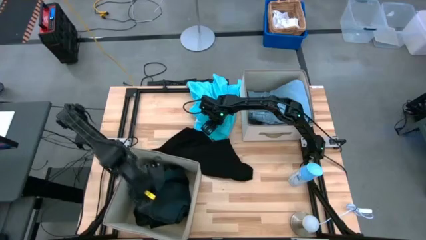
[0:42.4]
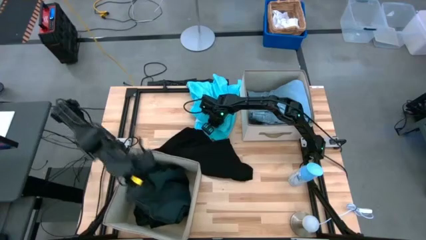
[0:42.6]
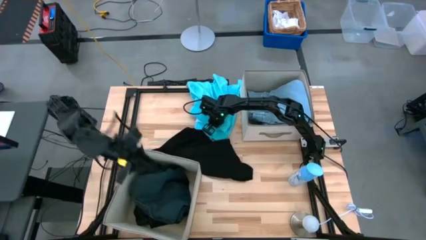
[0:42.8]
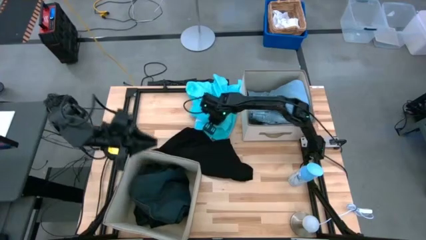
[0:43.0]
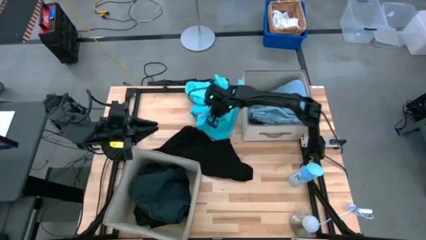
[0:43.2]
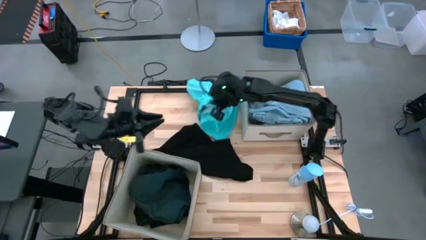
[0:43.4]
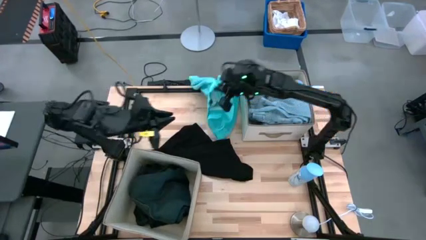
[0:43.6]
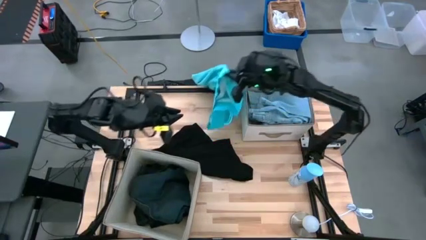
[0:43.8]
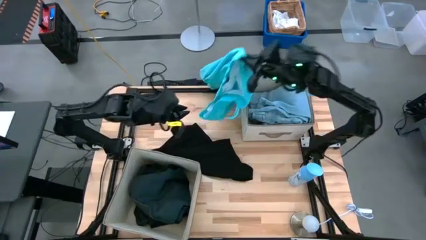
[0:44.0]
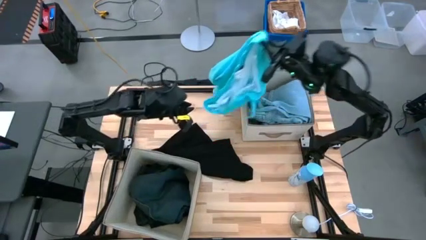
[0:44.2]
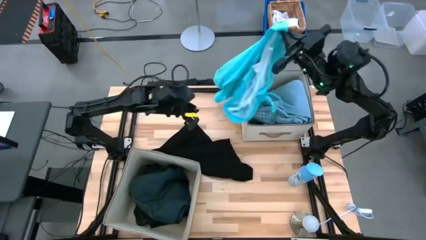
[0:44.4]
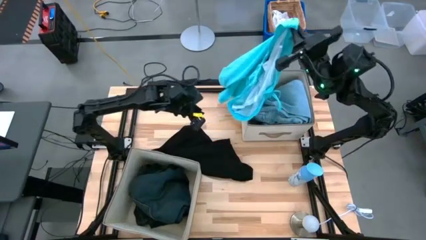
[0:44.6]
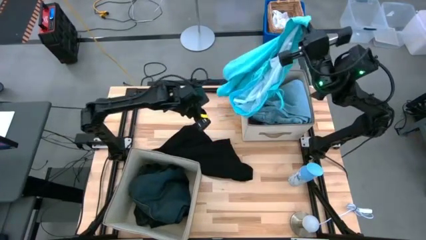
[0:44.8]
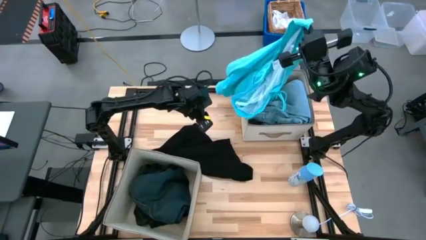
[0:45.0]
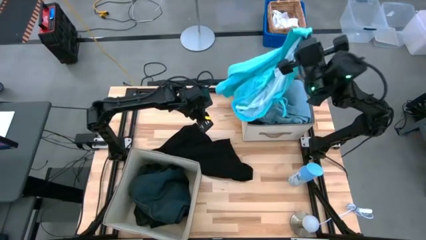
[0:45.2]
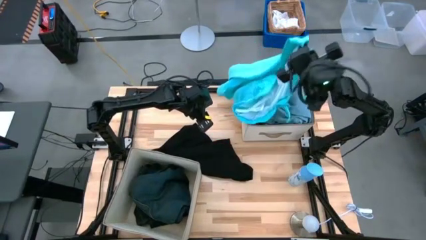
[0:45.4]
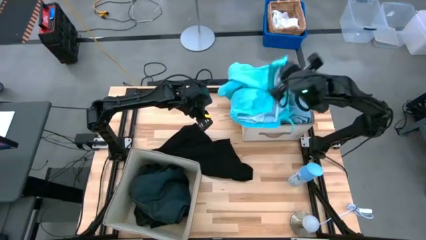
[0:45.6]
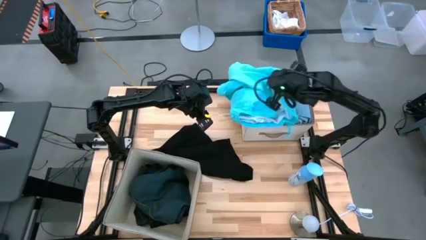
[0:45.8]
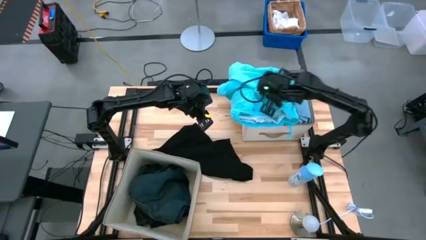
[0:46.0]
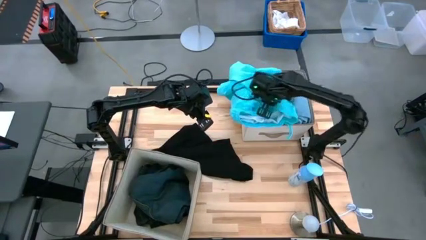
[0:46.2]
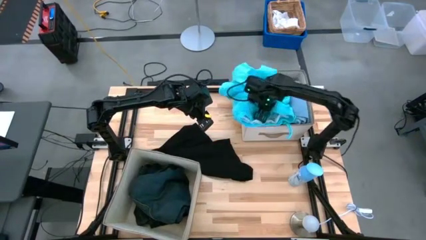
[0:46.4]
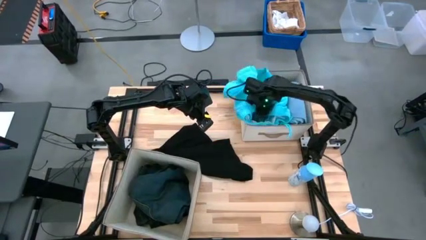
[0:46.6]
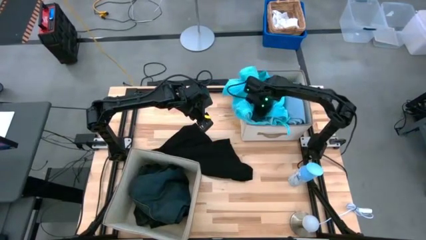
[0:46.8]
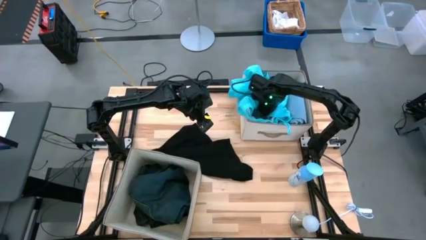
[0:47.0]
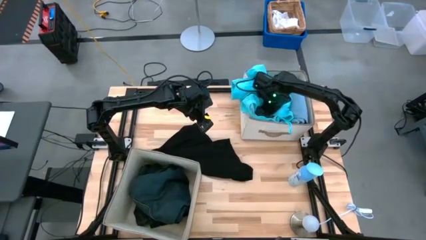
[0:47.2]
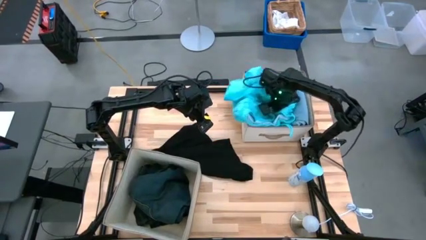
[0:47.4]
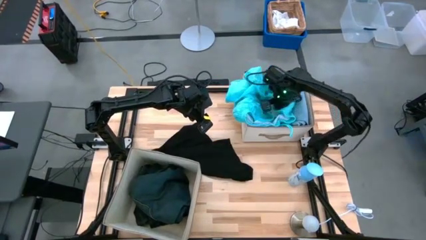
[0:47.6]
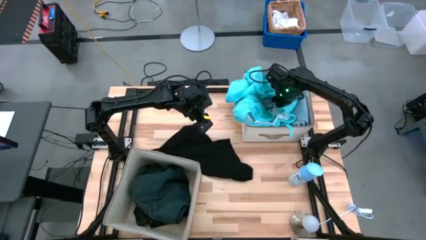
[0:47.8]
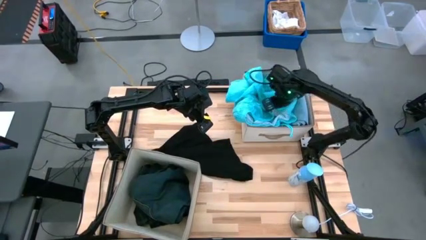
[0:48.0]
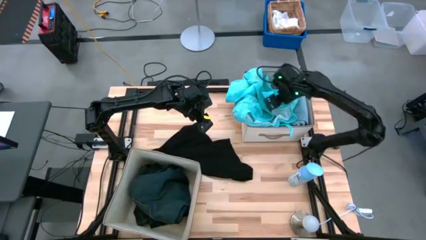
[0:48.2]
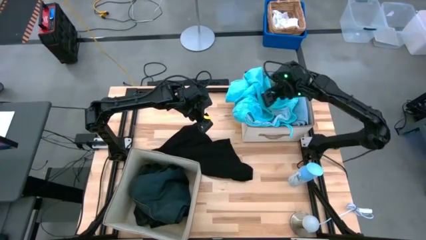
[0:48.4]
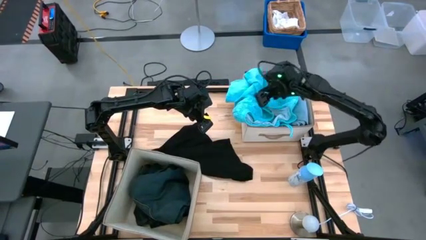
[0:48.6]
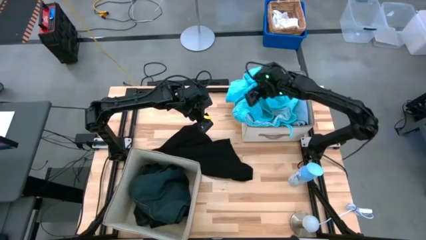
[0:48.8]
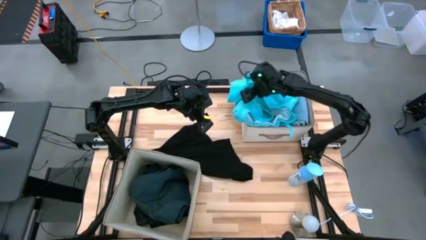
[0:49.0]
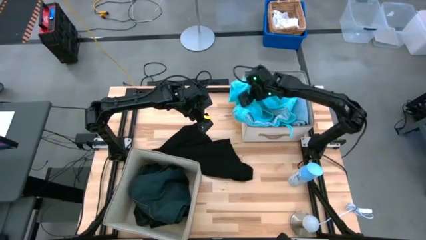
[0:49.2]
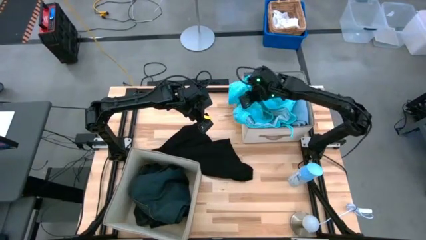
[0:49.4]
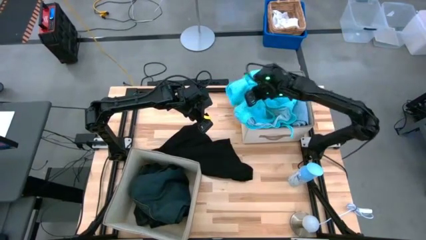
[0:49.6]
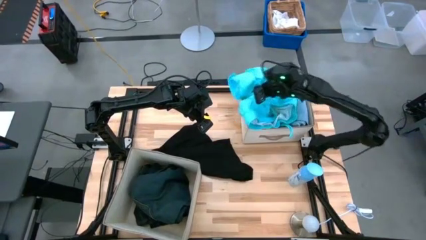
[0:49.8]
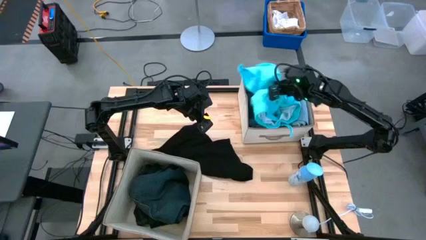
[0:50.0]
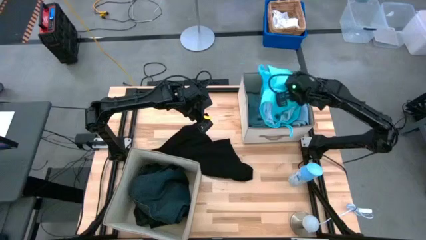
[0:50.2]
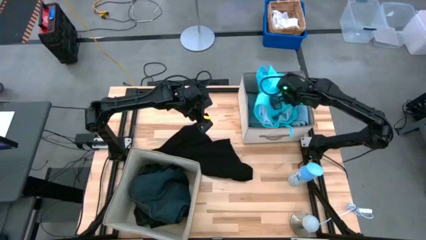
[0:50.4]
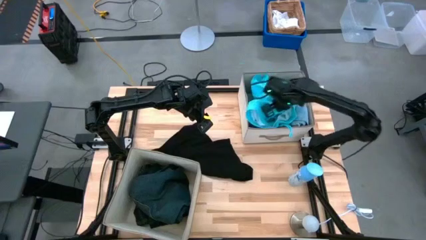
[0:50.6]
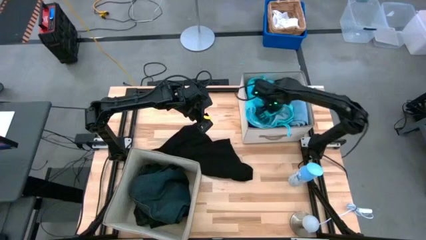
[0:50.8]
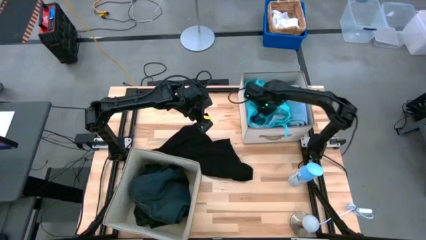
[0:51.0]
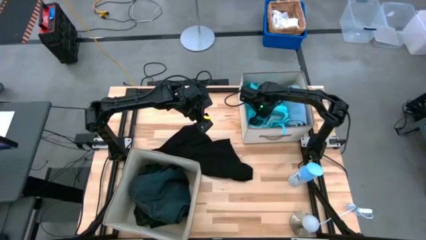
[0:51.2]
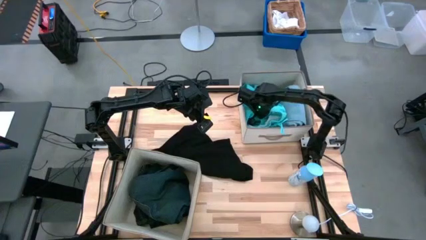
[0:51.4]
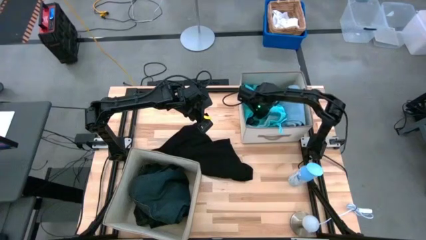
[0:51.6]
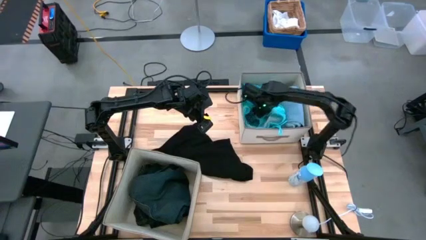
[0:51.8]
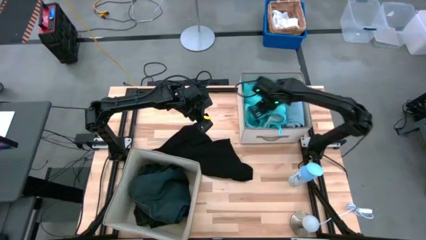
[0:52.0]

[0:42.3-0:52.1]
Task: Sort clothes
Put the light shorts into the top laundry bin

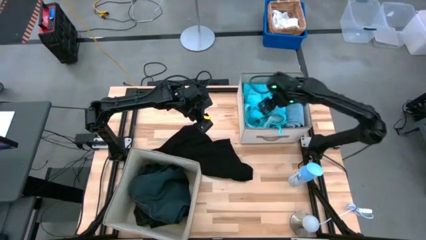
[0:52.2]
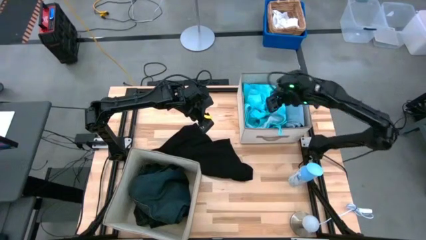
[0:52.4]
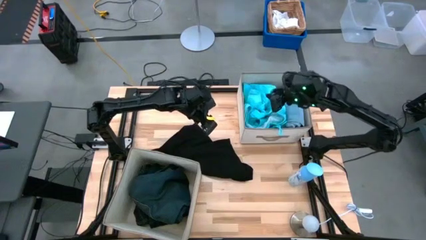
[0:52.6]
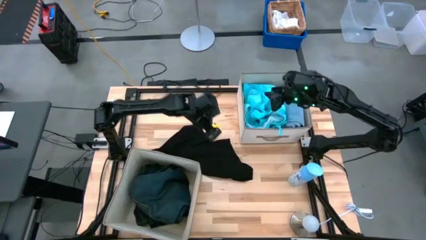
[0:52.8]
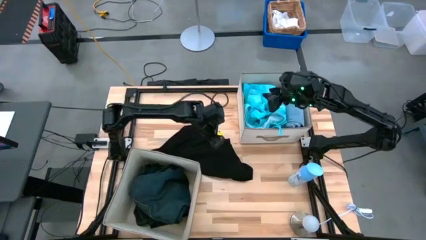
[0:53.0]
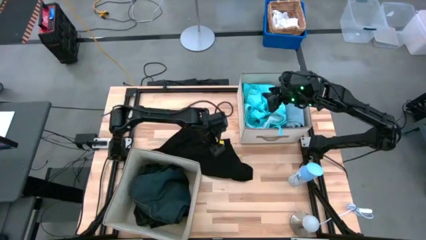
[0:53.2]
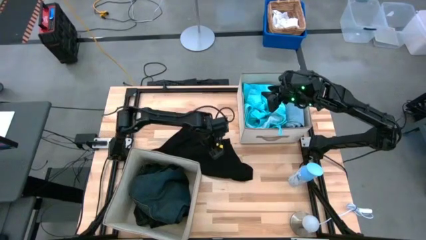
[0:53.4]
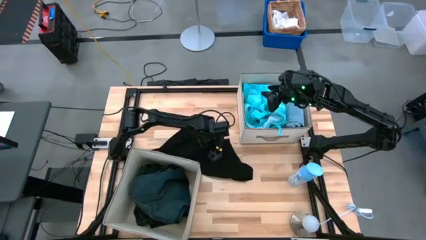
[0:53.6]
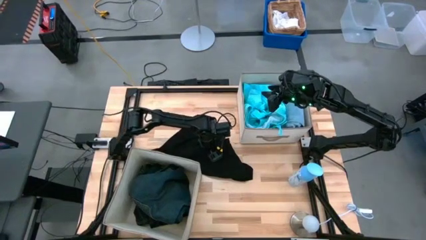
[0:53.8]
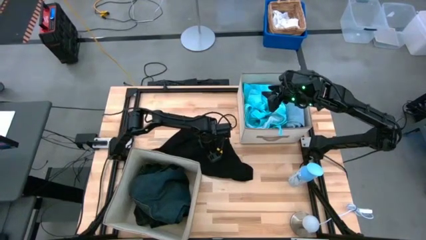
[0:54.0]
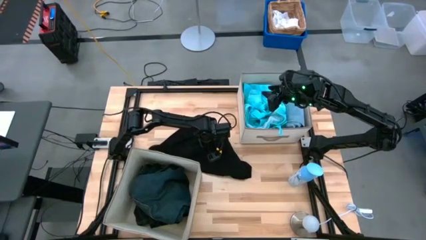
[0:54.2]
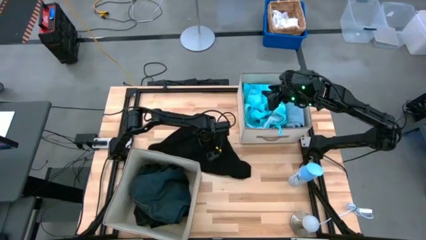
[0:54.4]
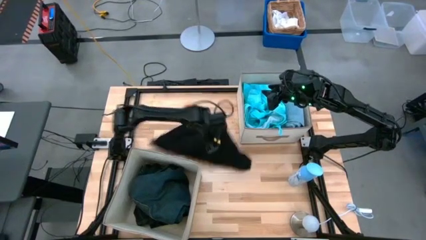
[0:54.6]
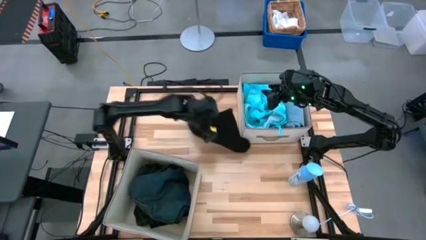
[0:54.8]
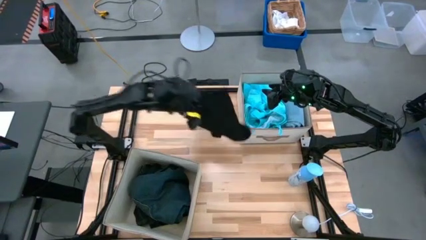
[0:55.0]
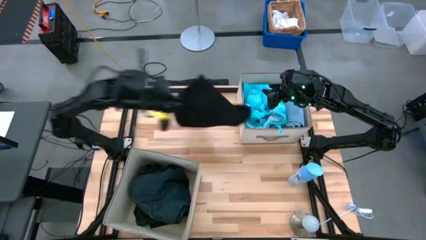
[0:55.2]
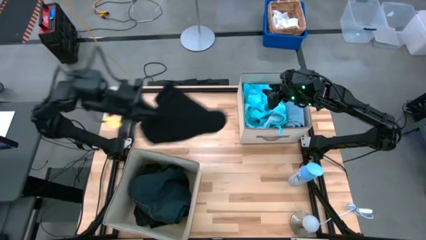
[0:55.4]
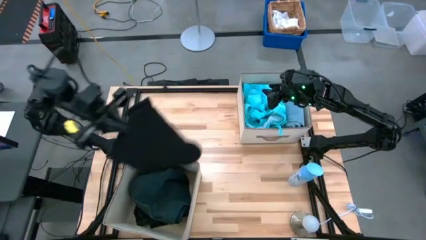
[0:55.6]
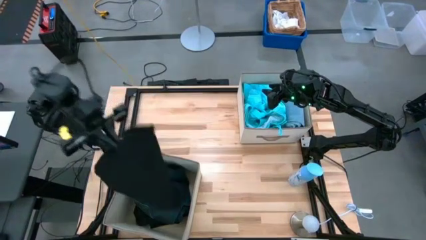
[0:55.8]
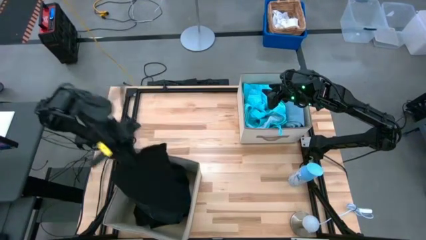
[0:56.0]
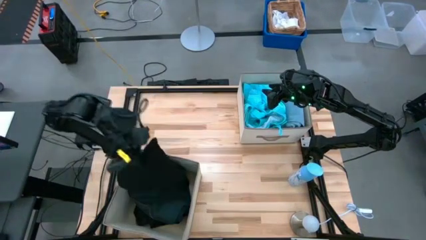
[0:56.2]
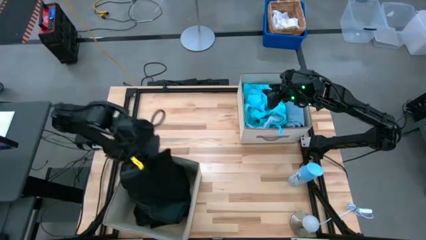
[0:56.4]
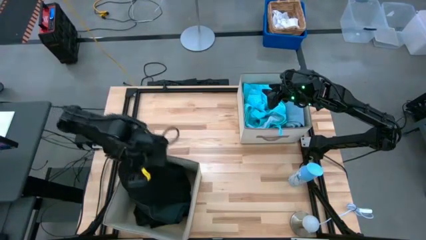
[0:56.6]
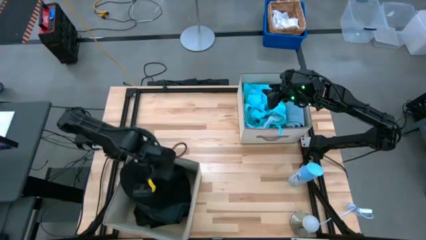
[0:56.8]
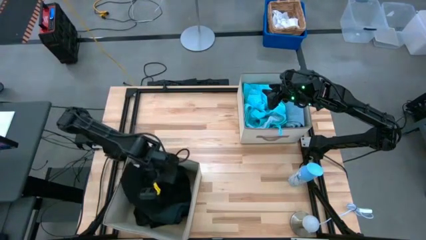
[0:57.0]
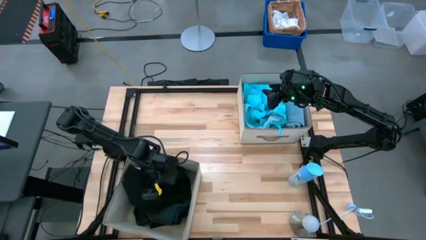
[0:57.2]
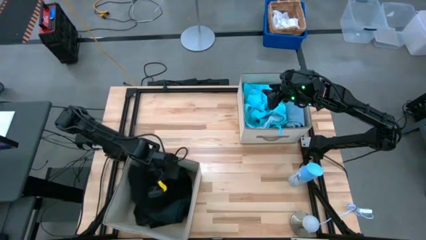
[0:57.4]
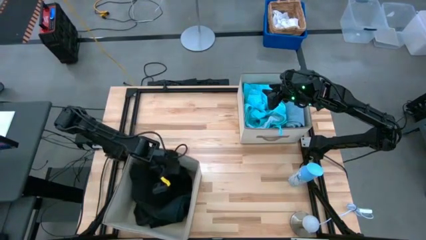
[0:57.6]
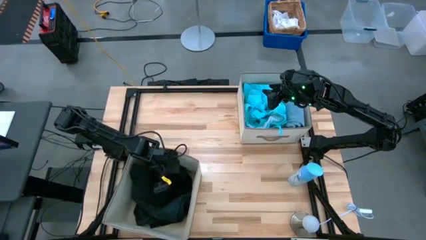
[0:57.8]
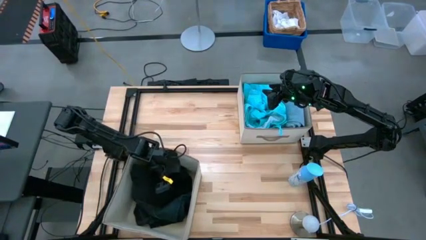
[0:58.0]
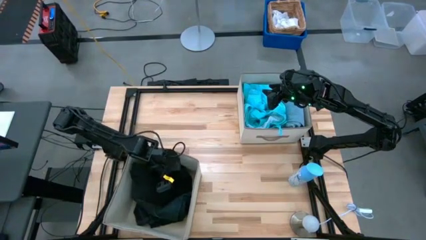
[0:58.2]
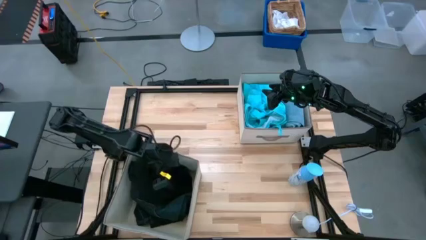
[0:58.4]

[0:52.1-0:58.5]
Put the black shirt into the bottom laundry bin
